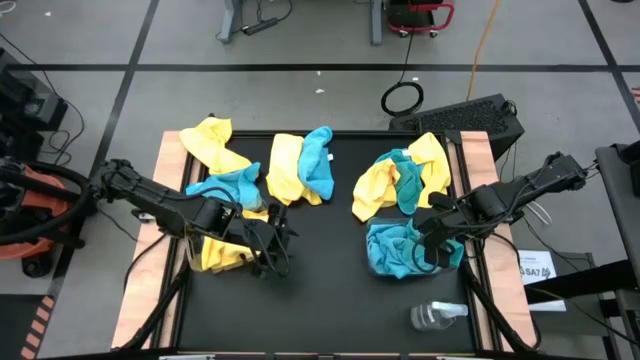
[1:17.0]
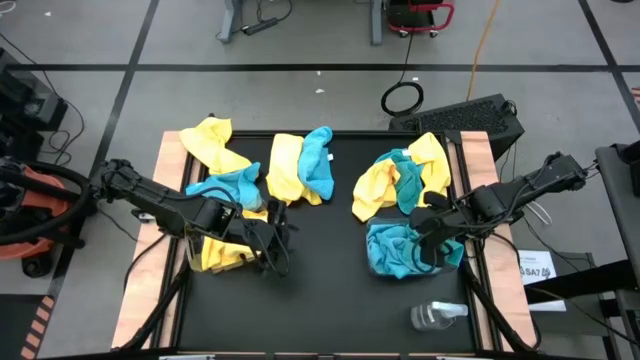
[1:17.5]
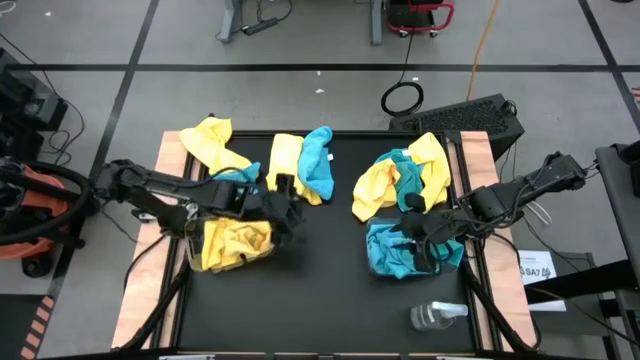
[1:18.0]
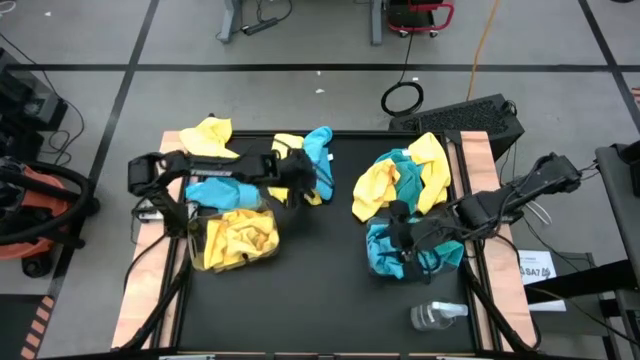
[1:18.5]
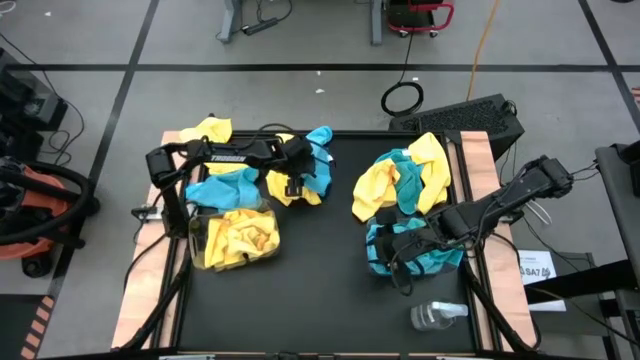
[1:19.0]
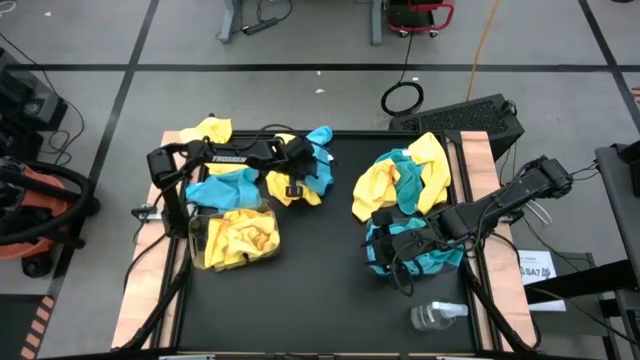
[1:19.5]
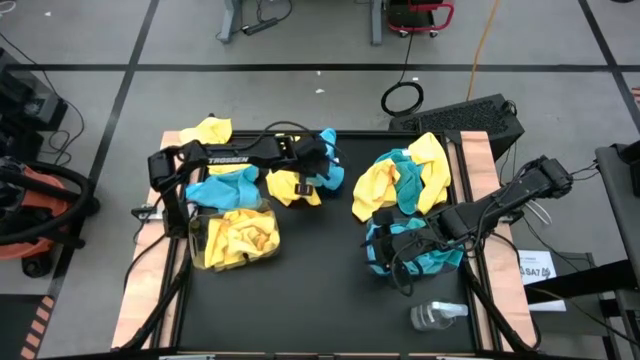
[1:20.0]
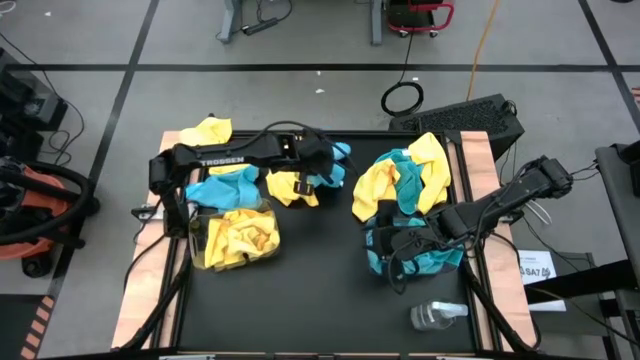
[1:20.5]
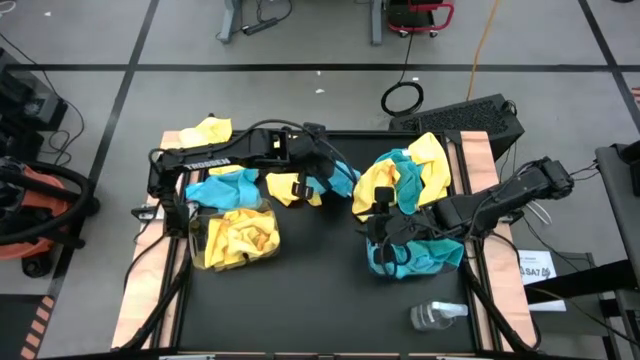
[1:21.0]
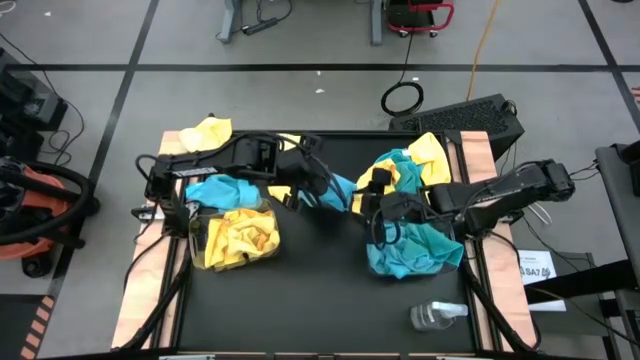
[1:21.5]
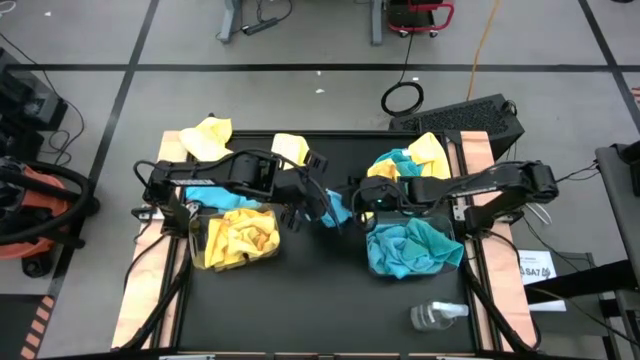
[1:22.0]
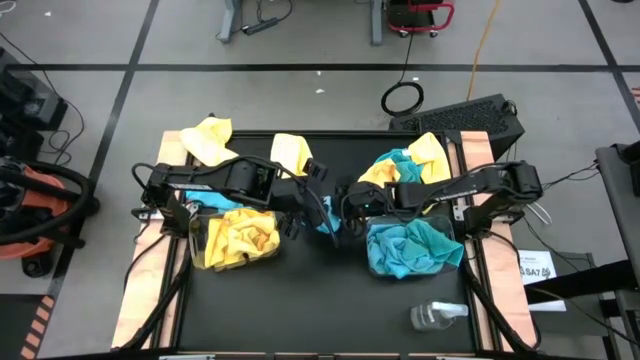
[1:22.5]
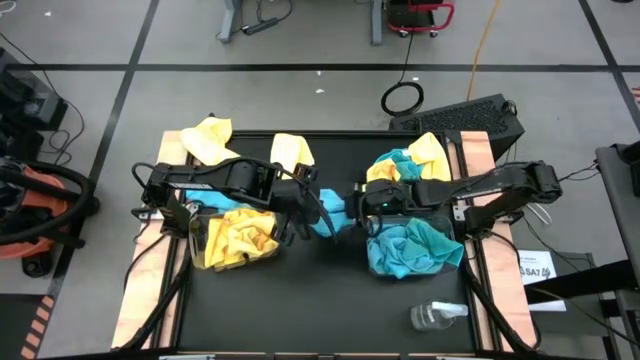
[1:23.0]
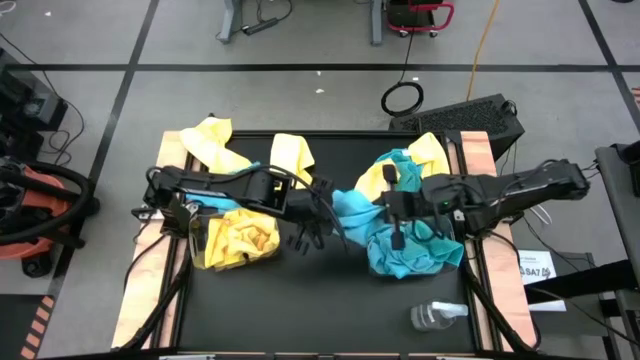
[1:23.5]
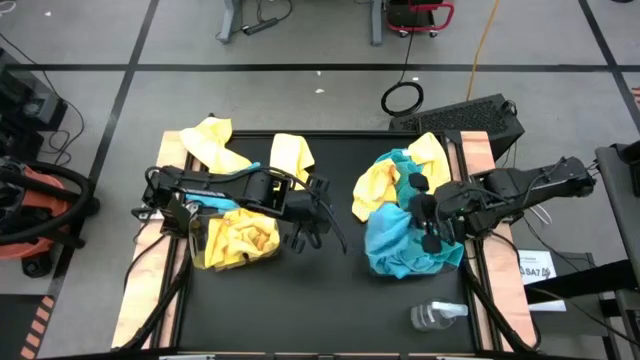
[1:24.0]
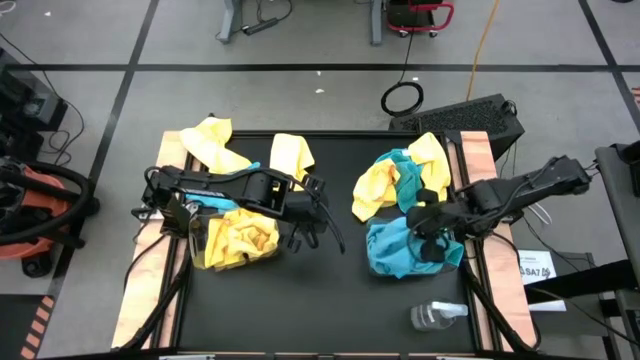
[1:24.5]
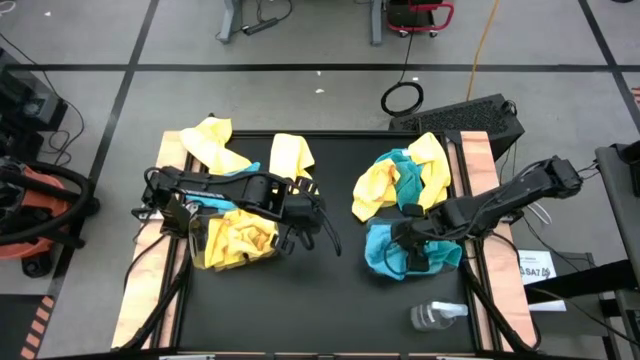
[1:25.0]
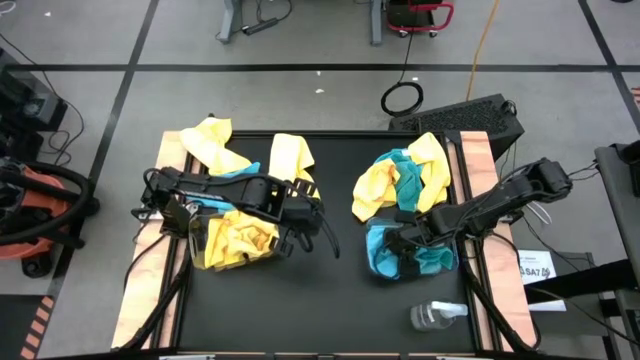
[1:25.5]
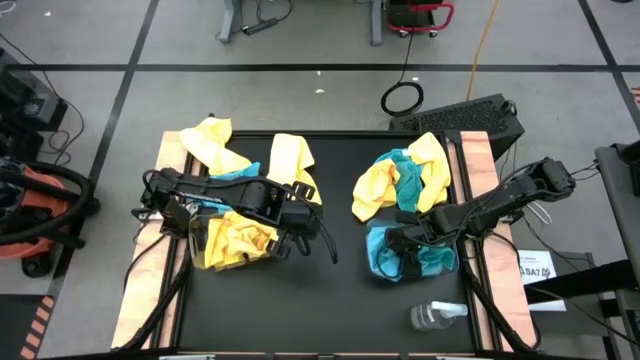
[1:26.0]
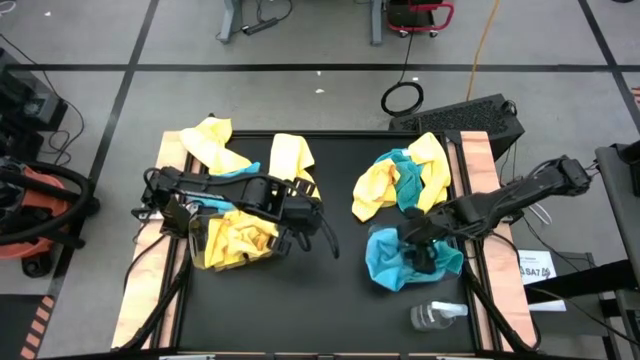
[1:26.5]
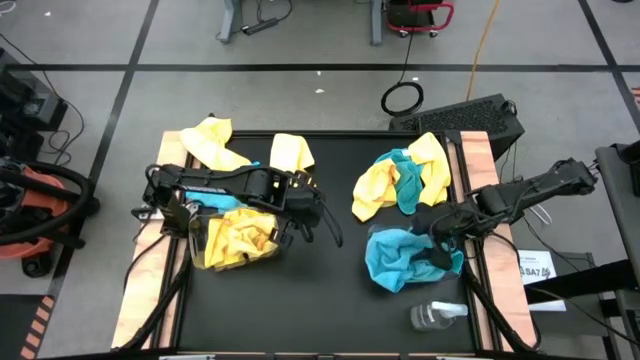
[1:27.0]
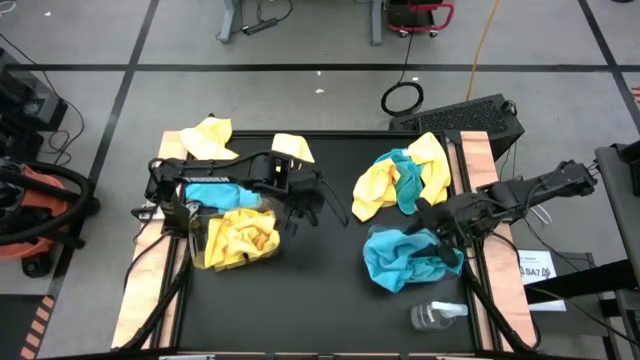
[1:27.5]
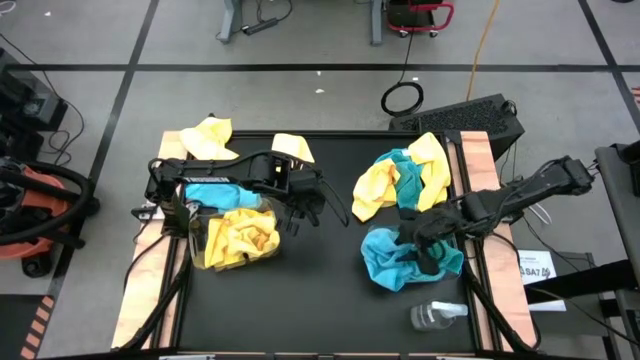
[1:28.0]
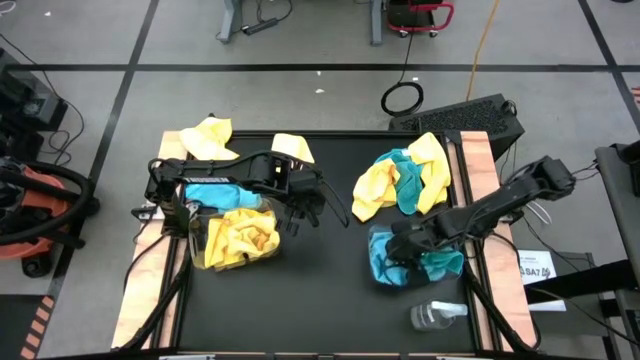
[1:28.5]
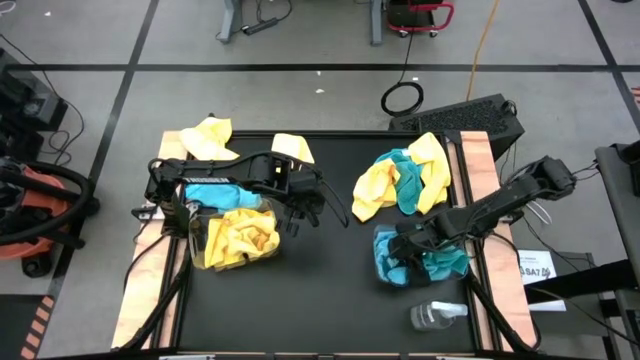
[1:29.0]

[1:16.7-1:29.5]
Task: Sort microfiber towel by color & place in baskets
Put the blue microfiber towel into the right transparent bin

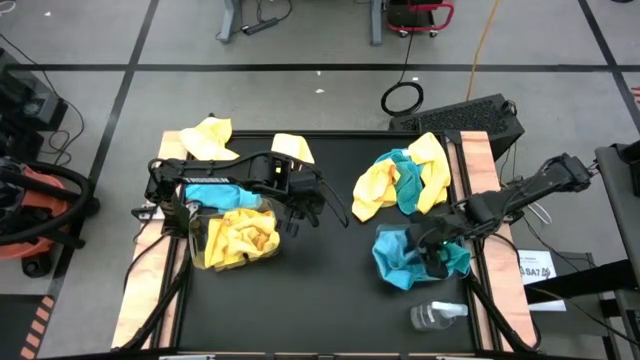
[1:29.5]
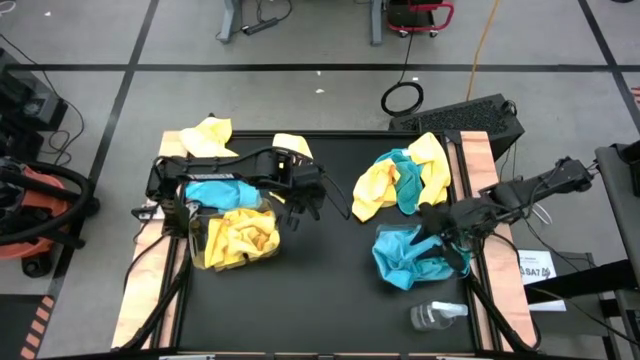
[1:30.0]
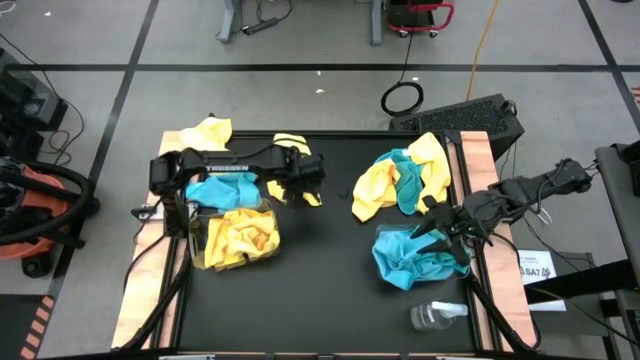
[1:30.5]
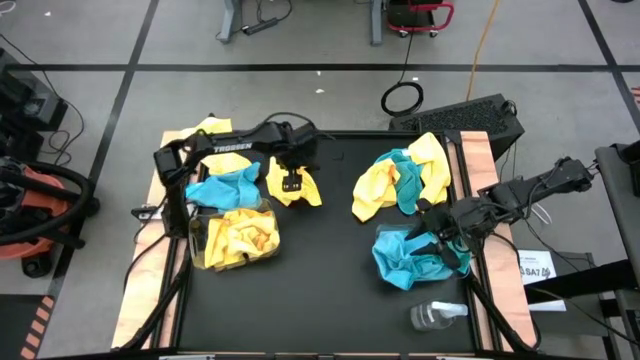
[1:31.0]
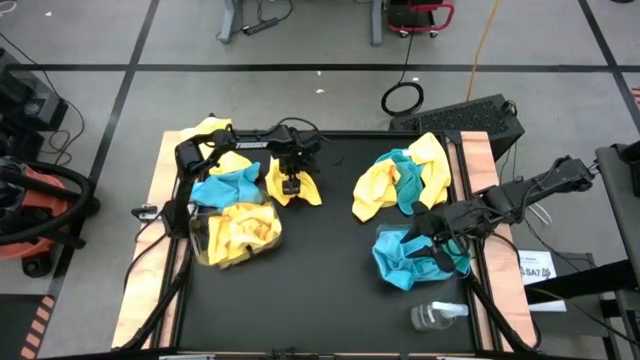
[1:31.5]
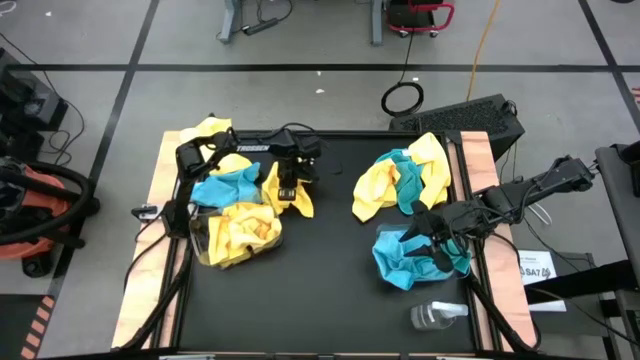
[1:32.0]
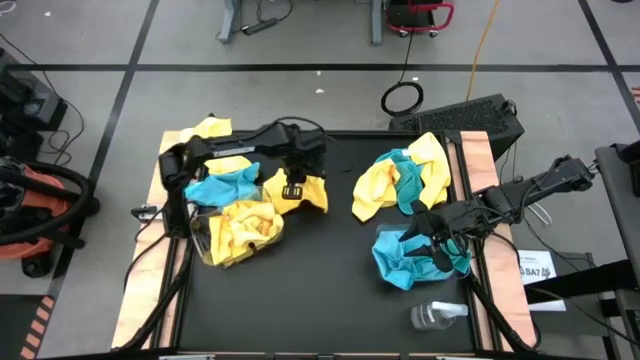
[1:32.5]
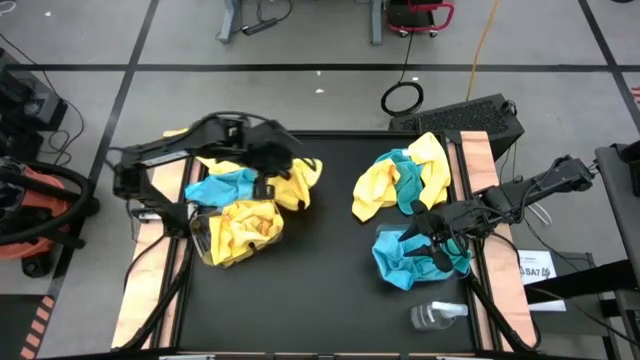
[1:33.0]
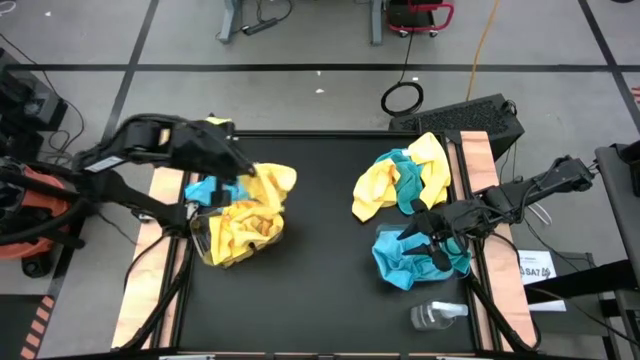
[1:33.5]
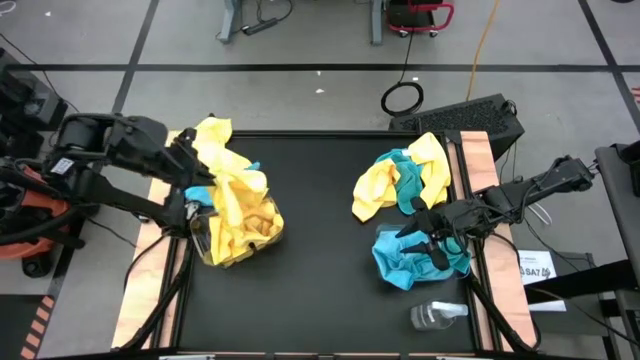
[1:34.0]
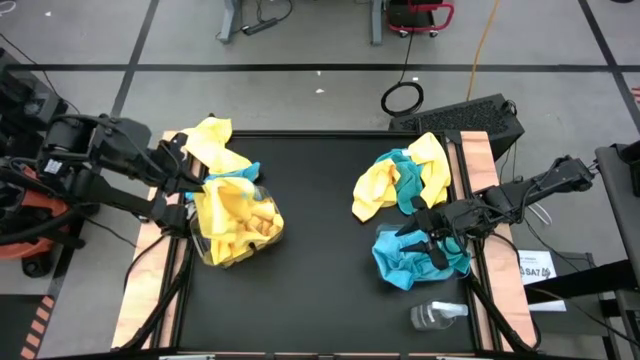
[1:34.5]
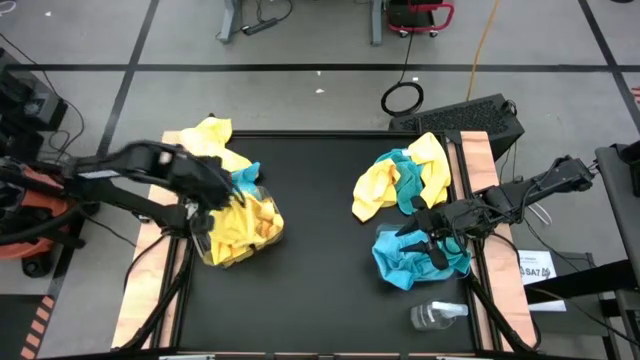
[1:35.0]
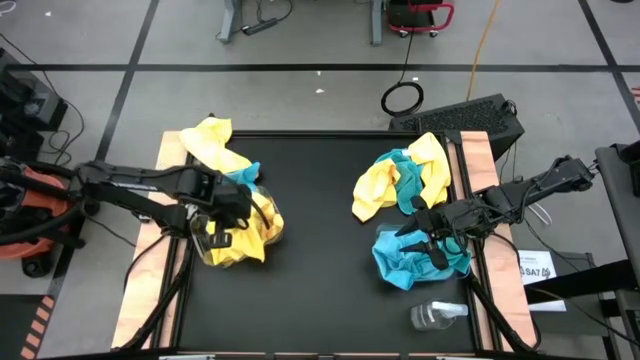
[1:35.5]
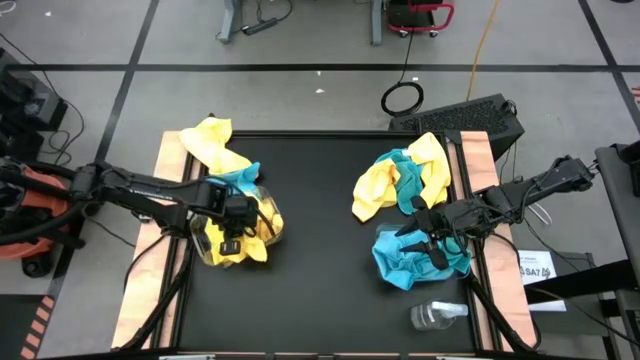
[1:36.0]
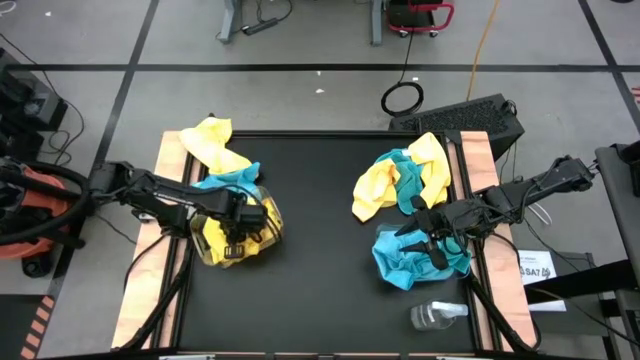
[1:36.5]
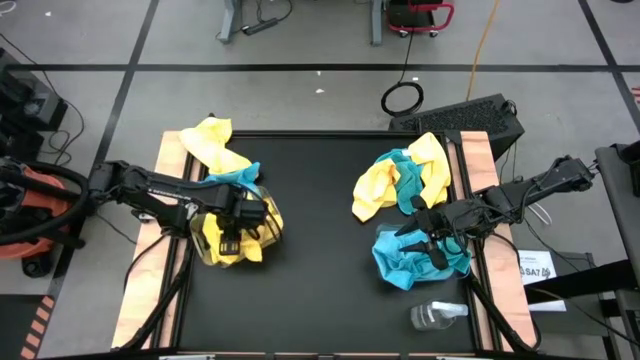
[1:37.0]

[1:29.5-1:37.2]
Put the yellow microfiber towel into the left transparent bin

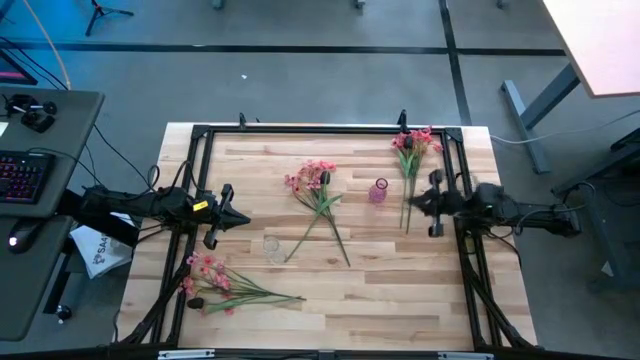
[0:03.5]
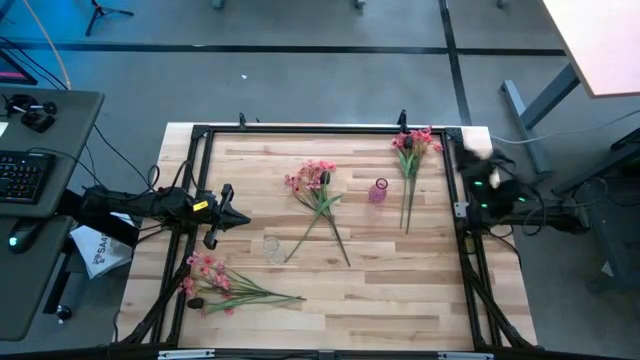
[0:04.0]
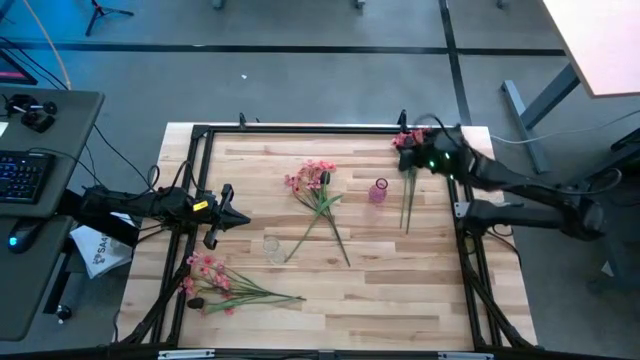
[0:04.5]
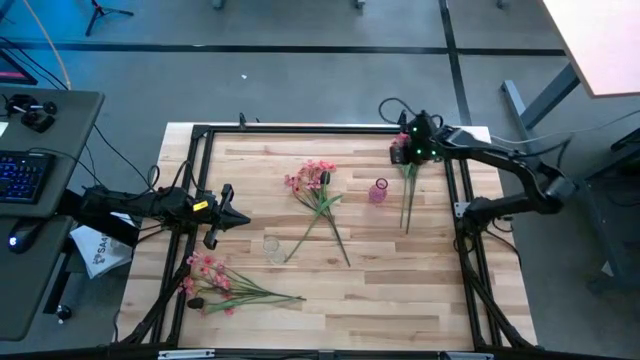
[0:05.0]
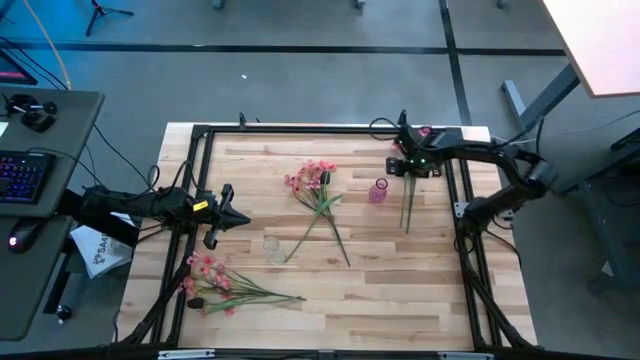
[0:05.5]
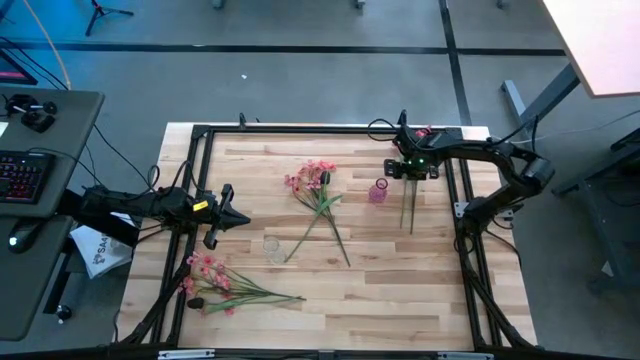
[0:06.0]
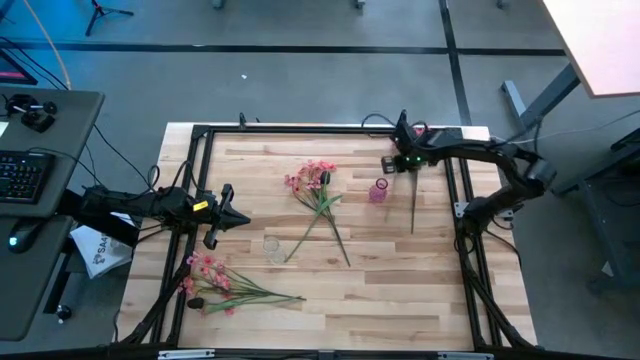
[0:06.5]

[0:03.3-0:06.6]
Task: Sort flowers into vase by color
Put the top right black tulip into the pink vase
